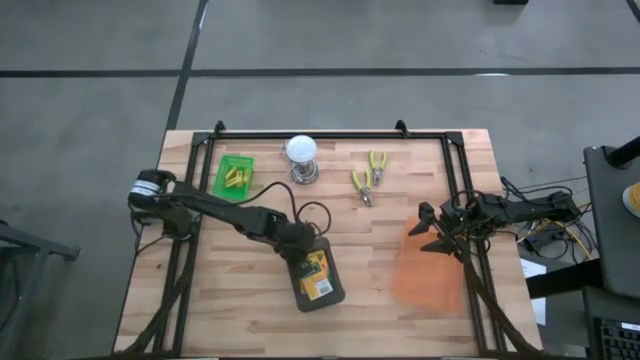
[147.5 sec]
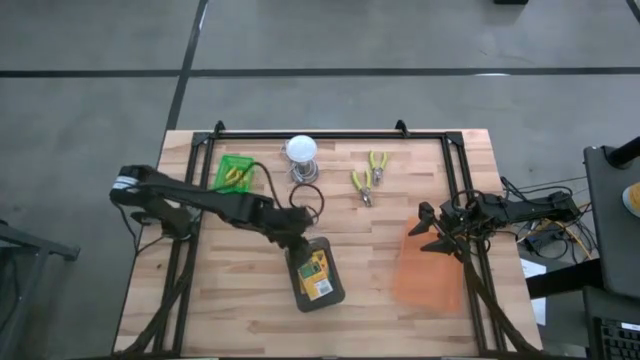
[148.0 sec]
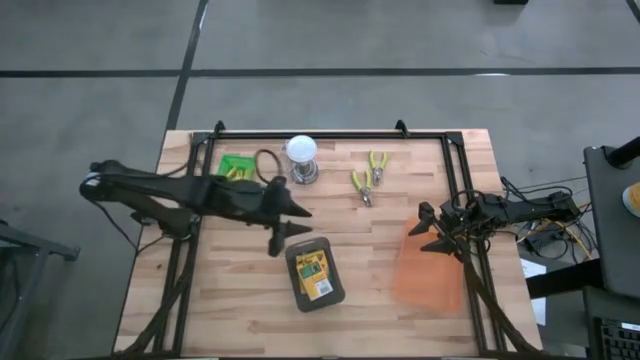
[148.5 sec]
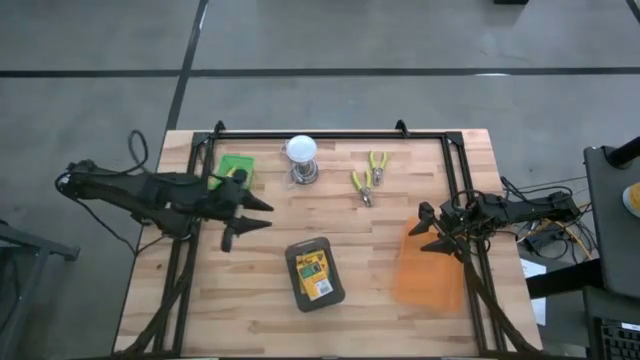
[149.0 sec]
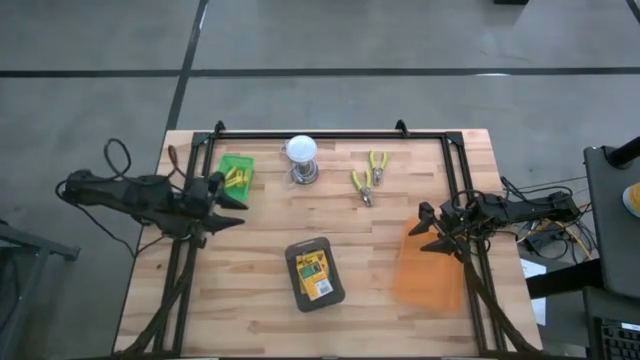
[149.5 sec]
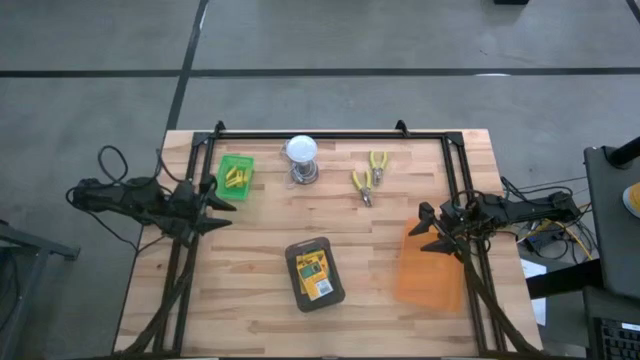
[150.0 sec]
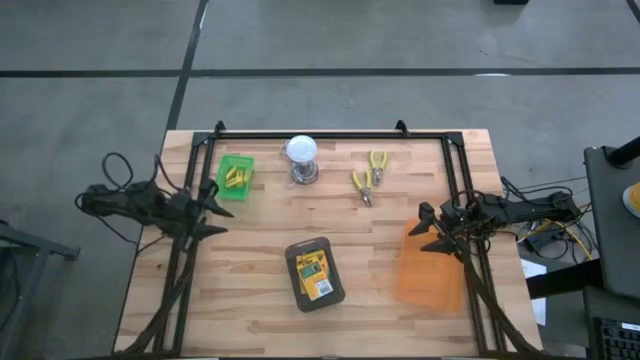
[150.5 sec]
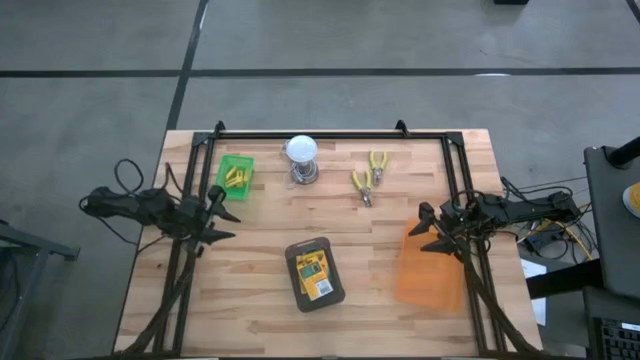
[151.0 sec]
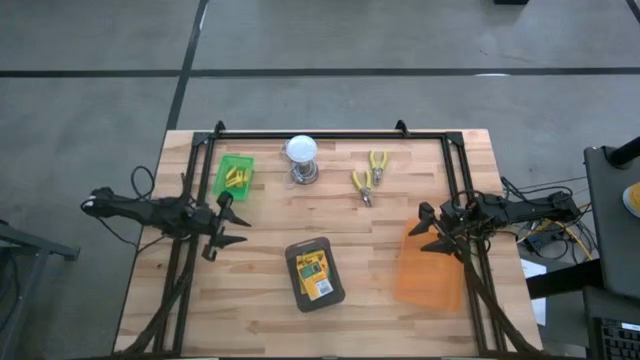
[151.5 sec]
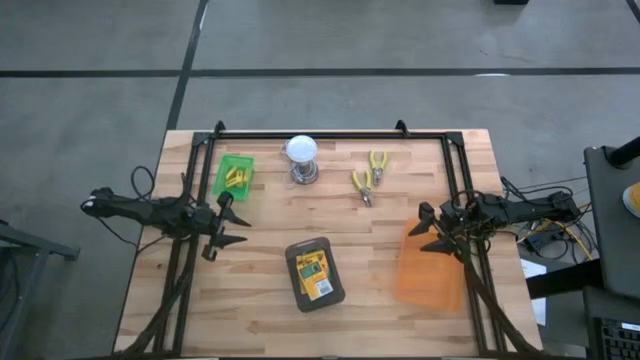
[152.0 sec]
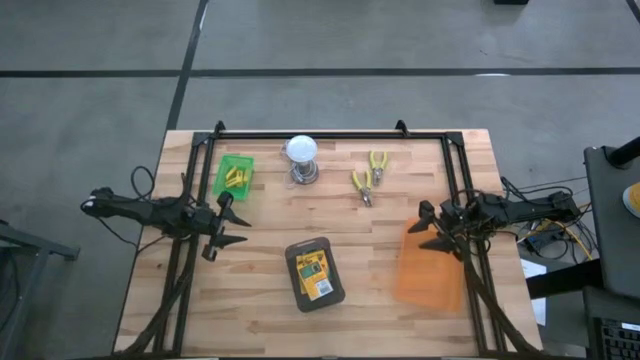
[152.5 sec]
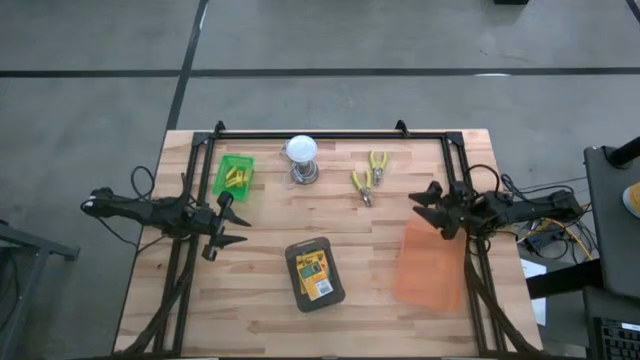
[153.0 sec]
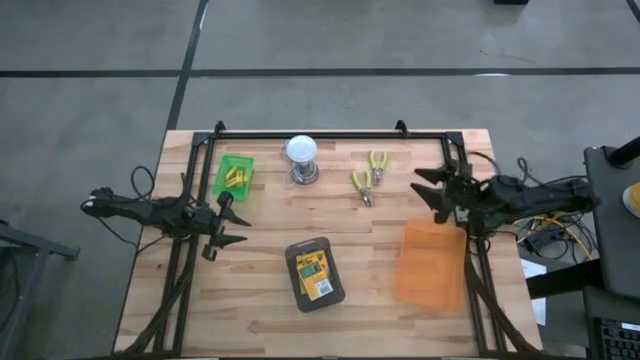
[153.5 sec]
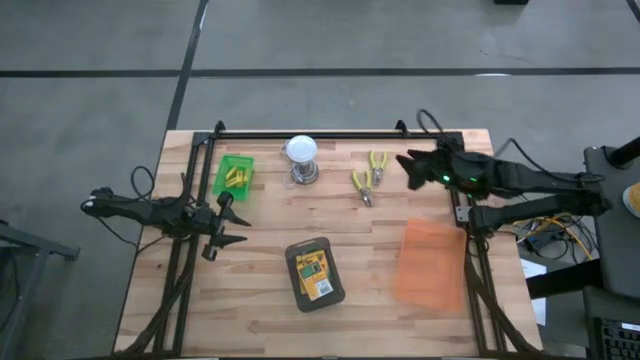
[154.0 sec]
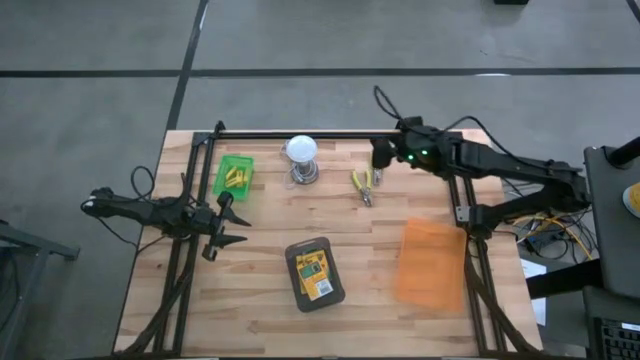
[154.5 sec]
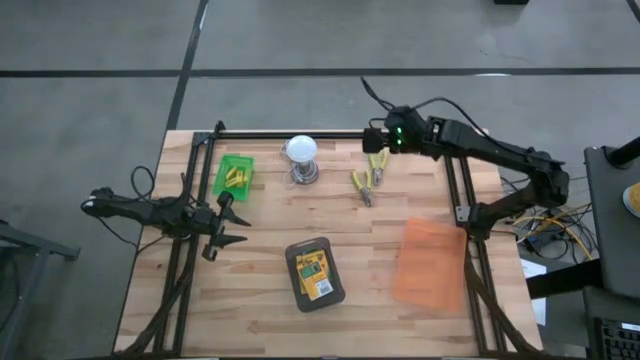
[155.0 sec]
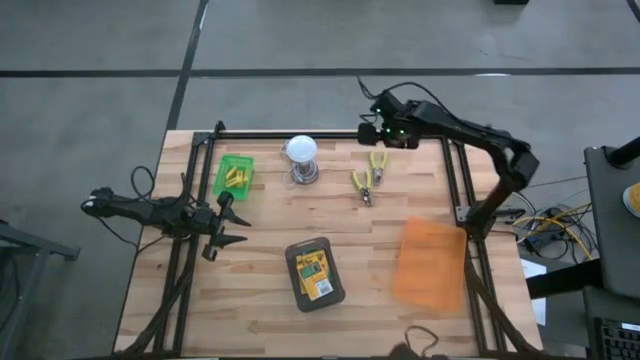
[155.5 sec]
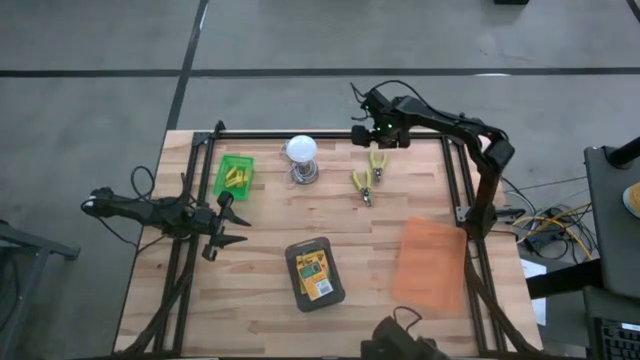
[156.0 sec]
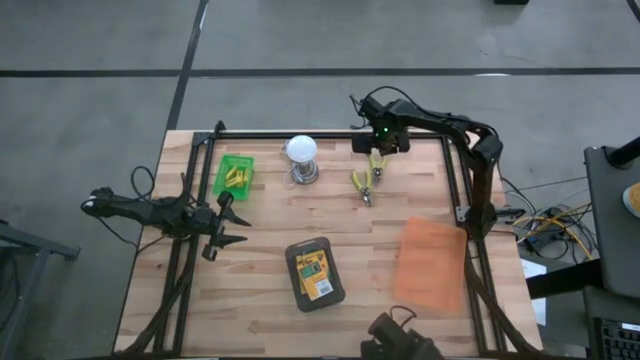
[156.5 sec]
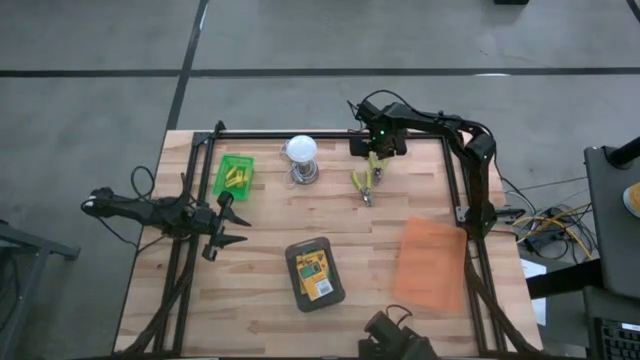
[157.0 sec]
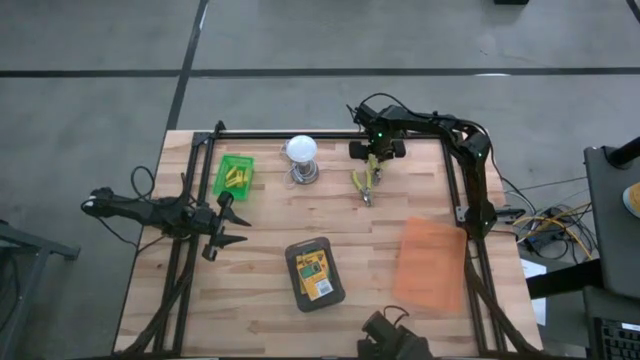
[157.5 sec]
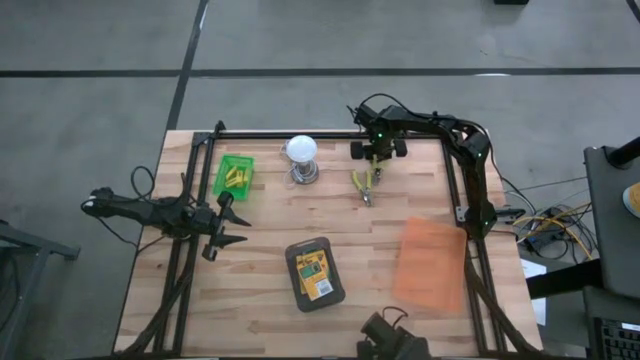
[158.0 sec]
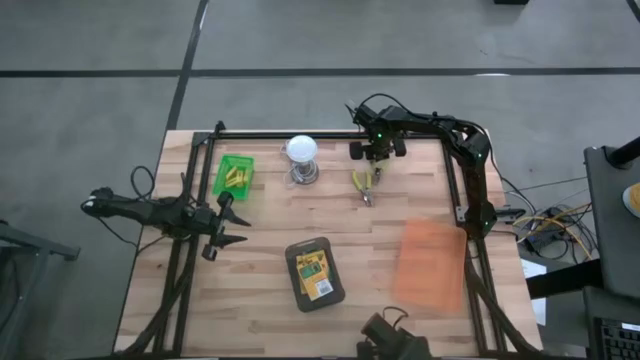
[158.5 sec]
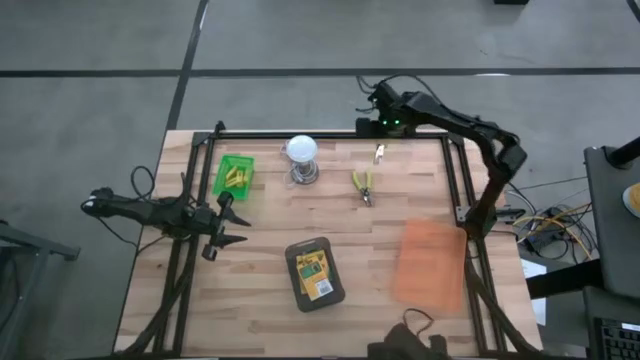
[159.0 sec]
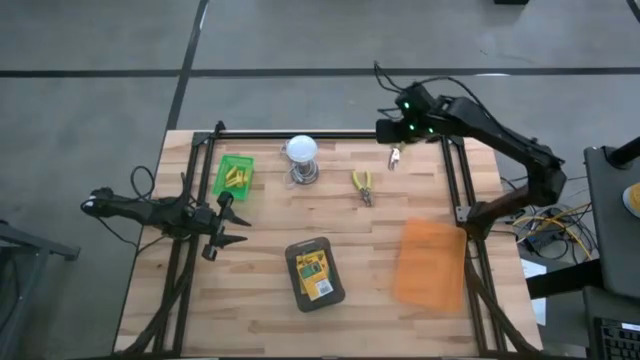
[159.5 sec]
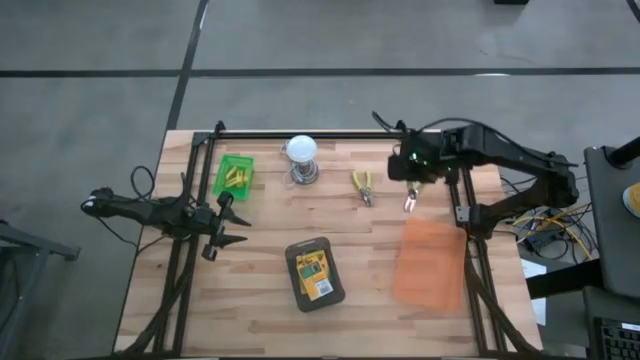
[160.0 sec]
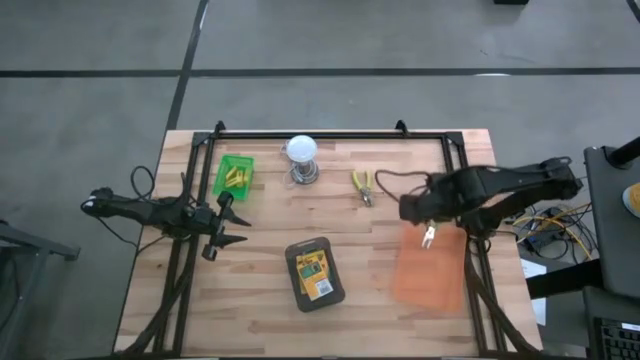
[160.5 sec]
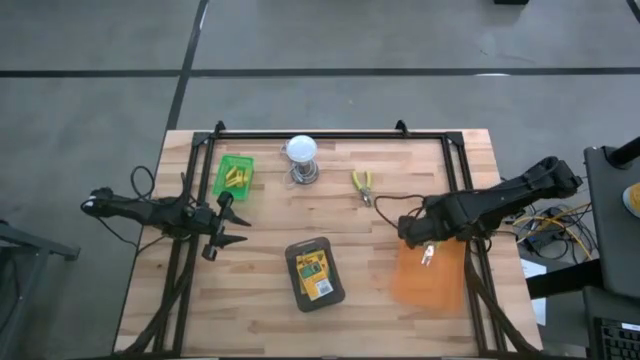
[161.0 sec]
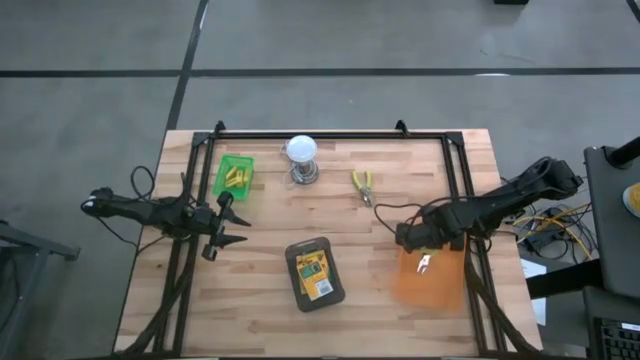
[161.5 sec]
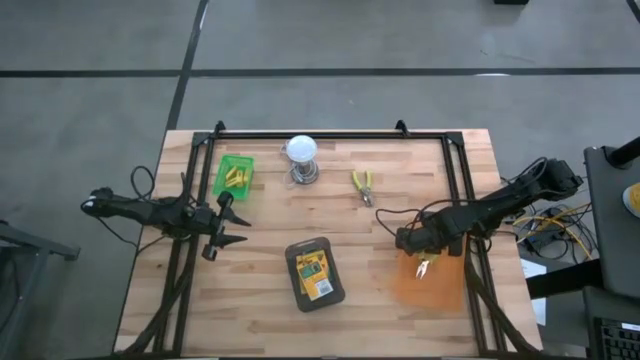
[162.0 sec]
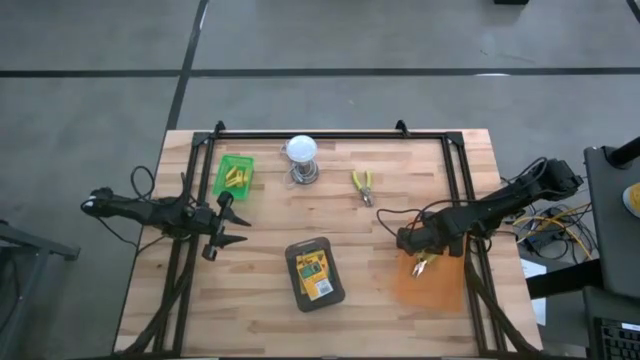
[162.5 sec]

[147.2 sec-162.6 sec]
Task: Pick & Place School Supplies
Put the green puncher into the orange bin

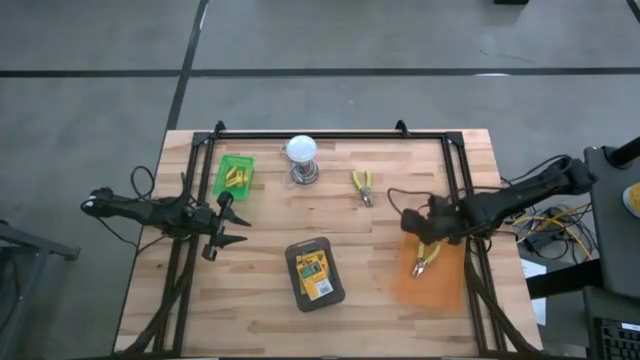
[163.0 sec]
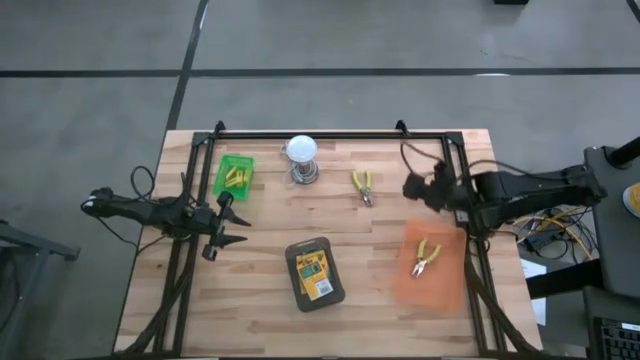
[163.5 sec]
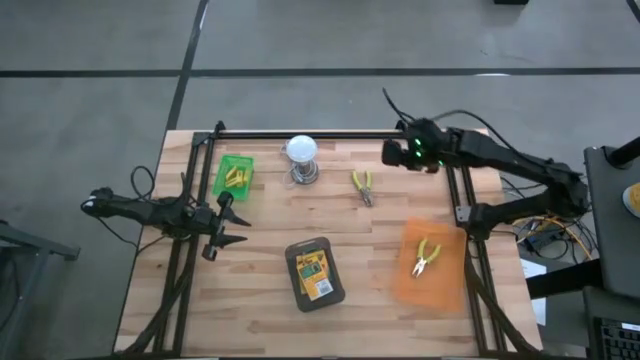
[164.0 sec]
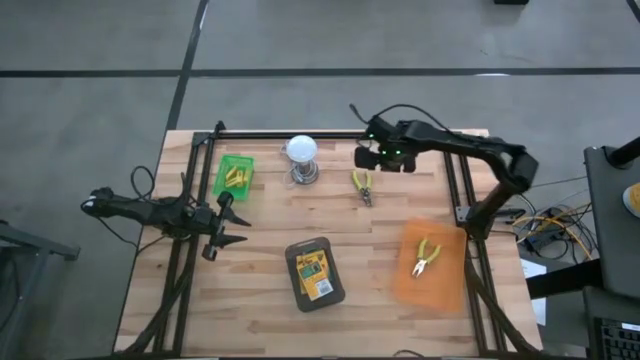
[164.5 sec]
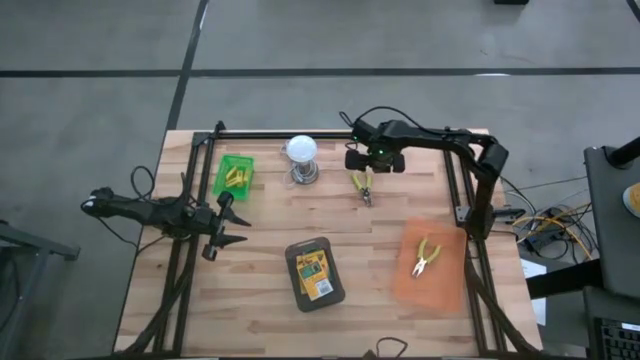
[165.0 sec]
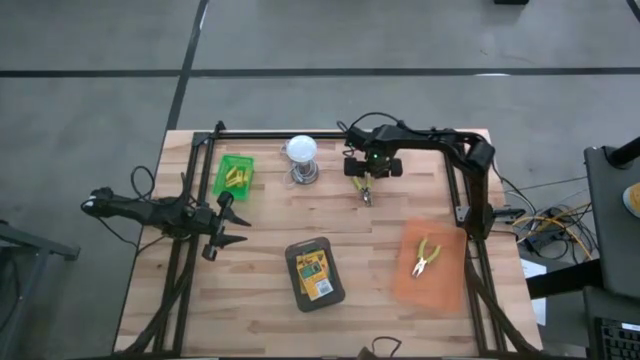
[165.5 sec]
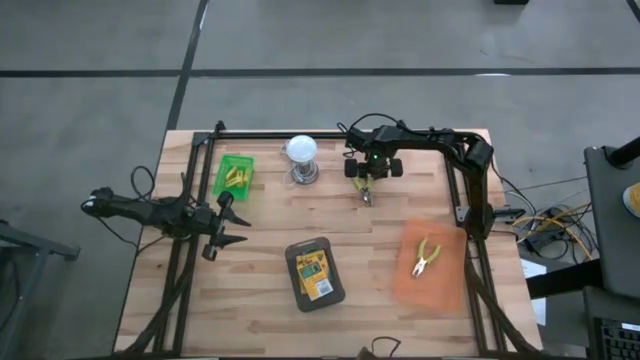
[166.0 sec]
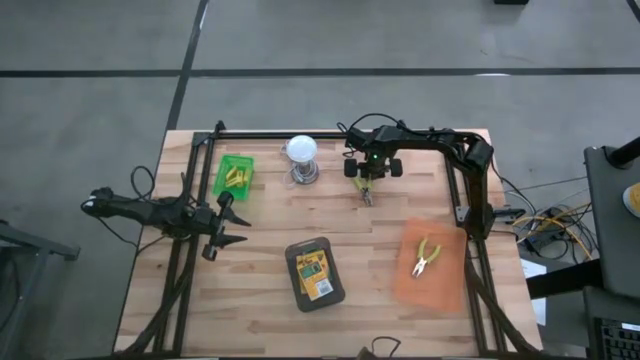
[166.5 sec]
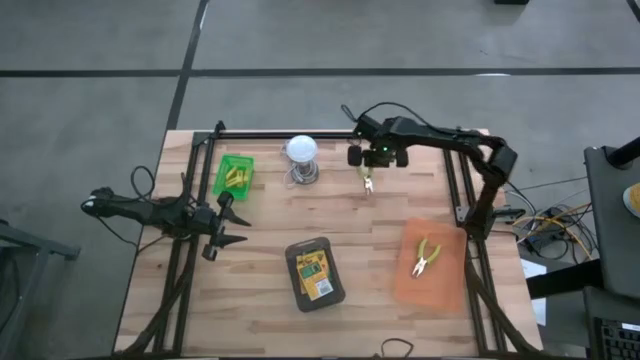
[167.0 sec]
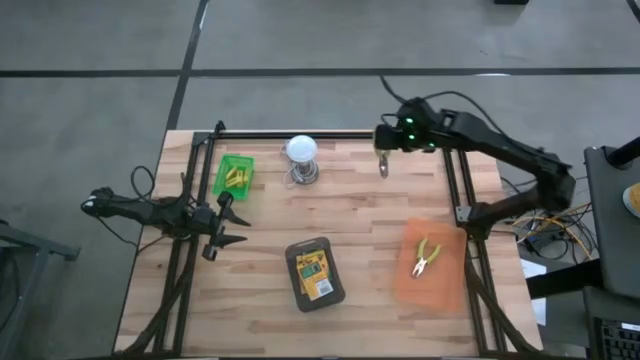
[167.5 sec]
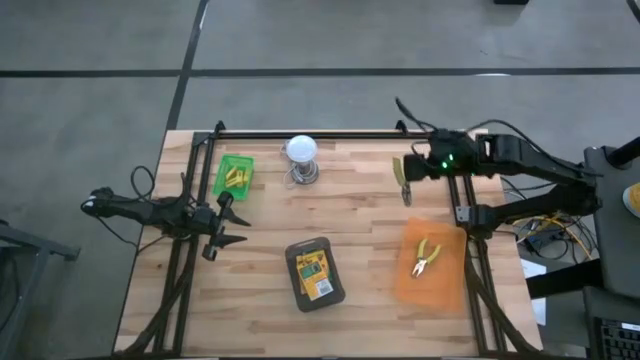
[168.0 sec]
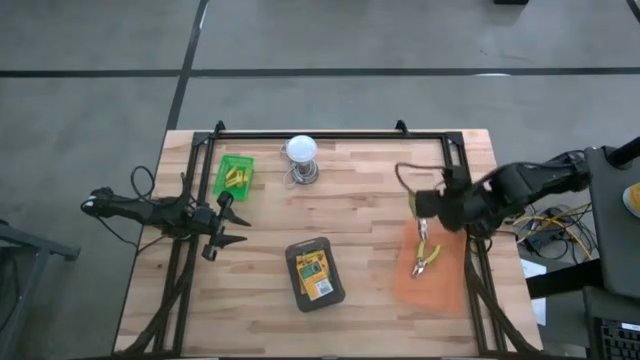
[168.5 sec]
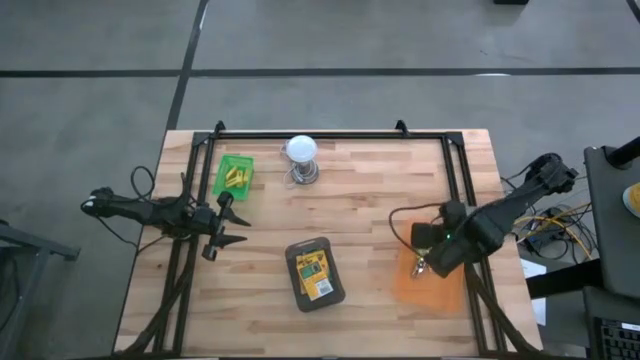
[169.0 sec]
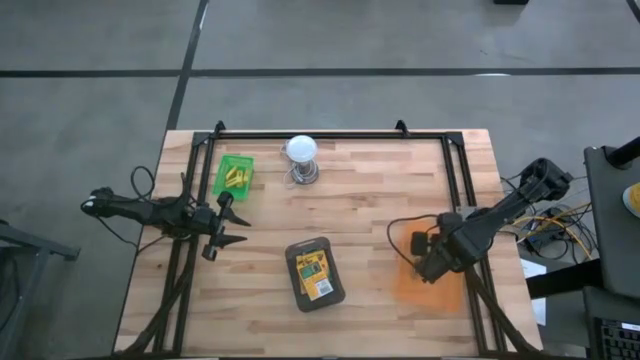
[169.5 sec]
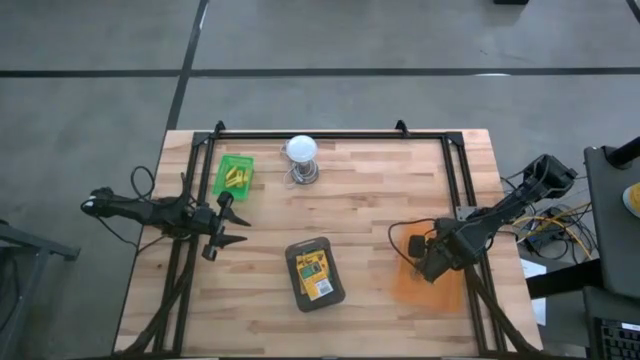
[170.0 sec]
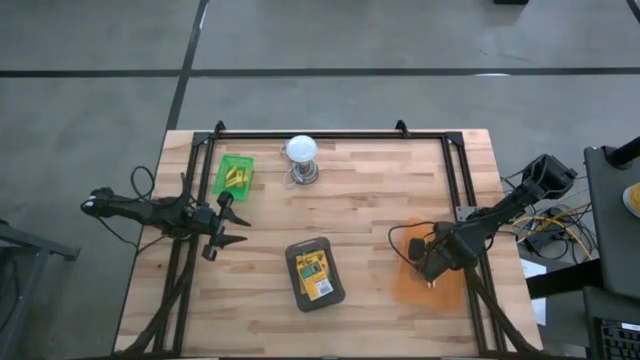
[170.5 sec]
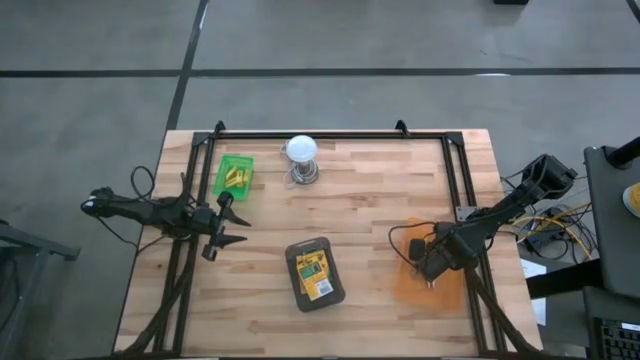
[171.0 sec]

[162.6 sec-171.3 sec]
Put the green puncher into the orange bin
